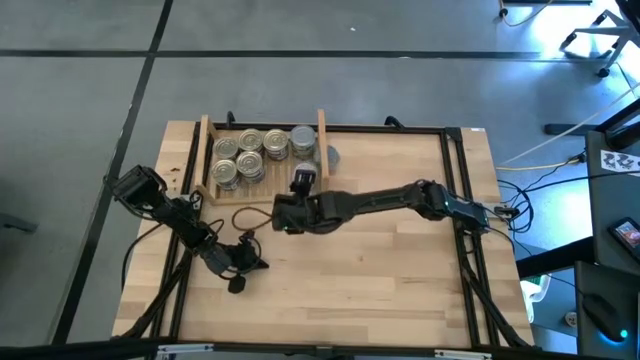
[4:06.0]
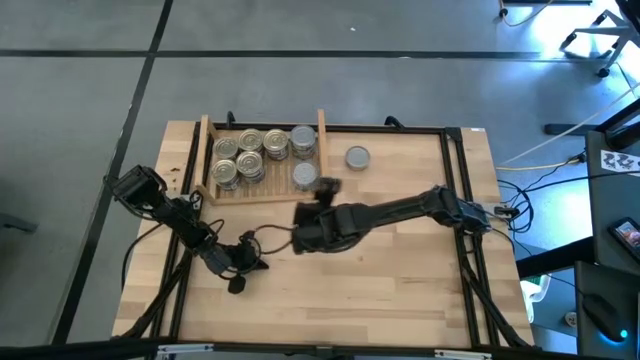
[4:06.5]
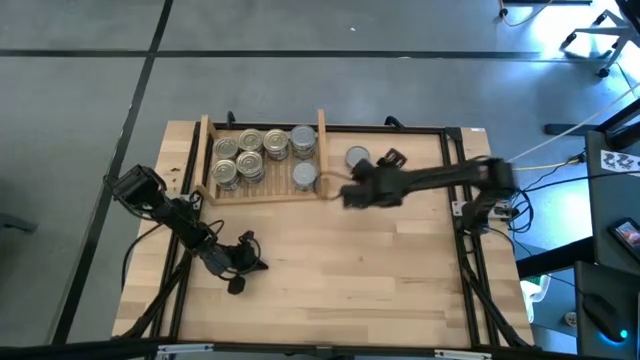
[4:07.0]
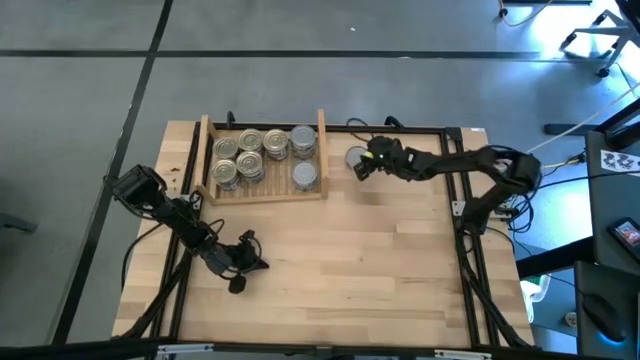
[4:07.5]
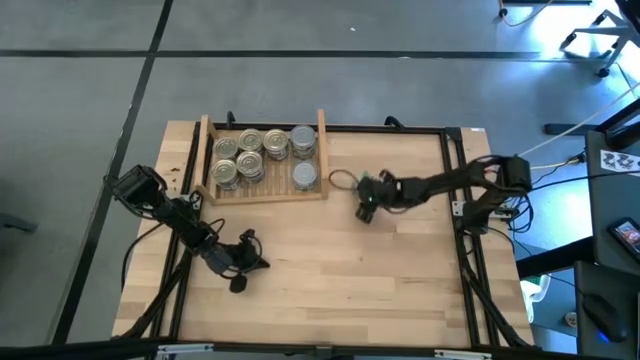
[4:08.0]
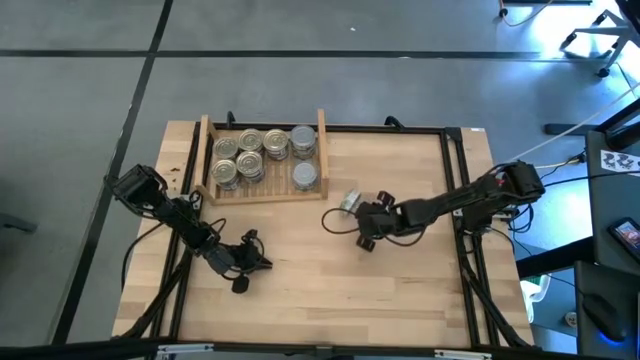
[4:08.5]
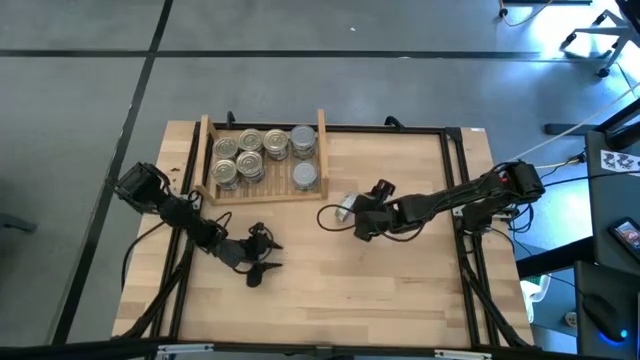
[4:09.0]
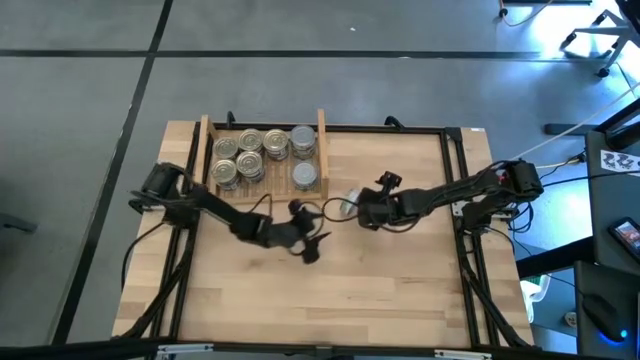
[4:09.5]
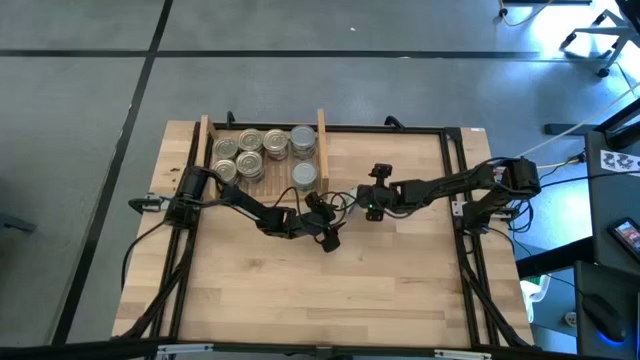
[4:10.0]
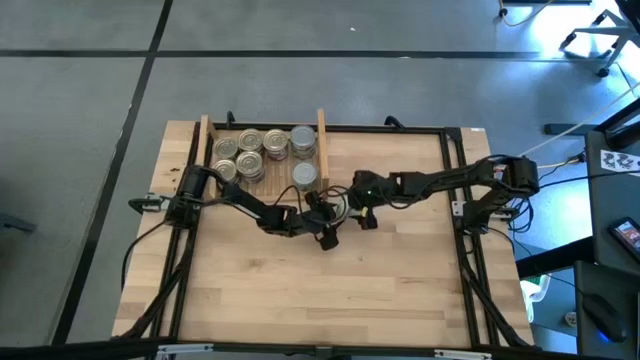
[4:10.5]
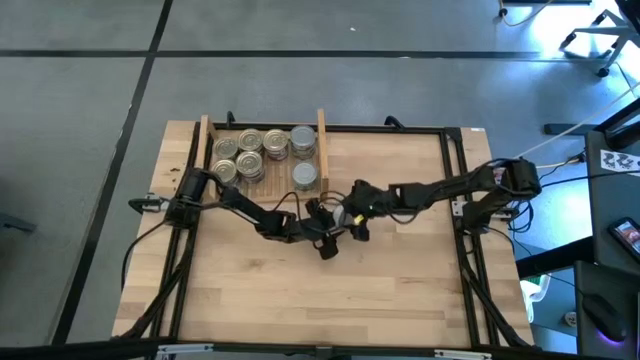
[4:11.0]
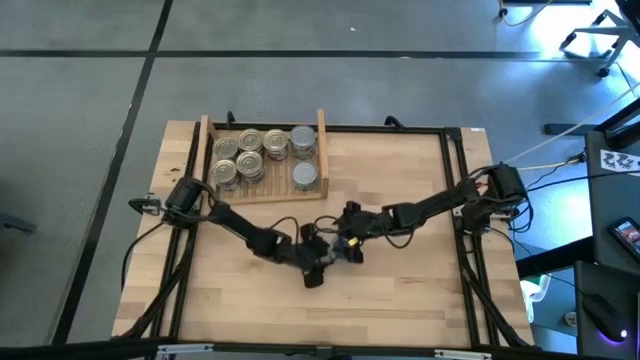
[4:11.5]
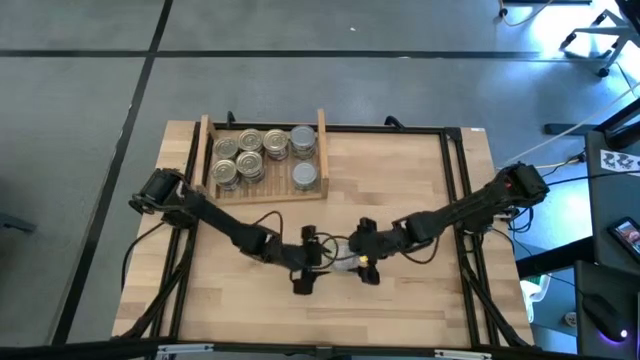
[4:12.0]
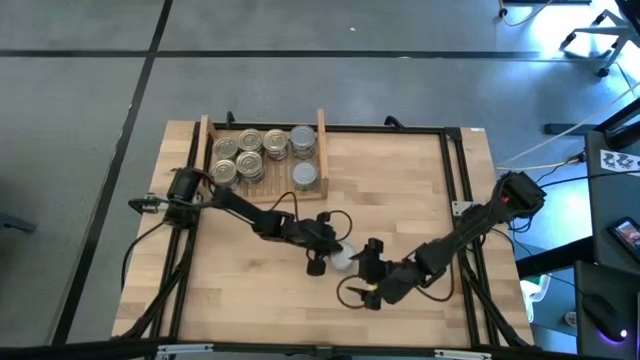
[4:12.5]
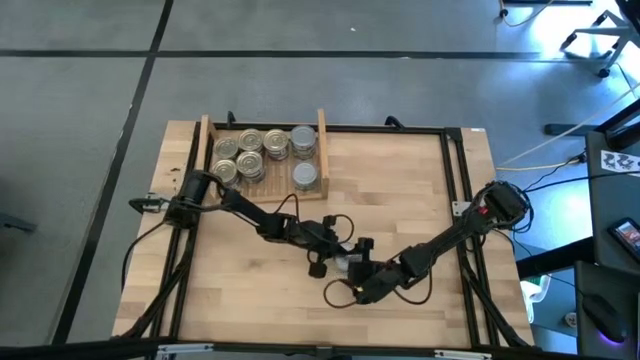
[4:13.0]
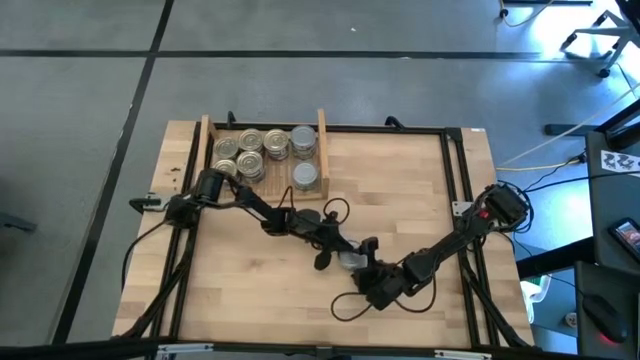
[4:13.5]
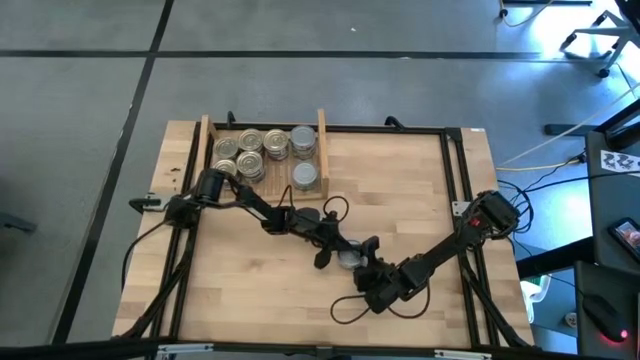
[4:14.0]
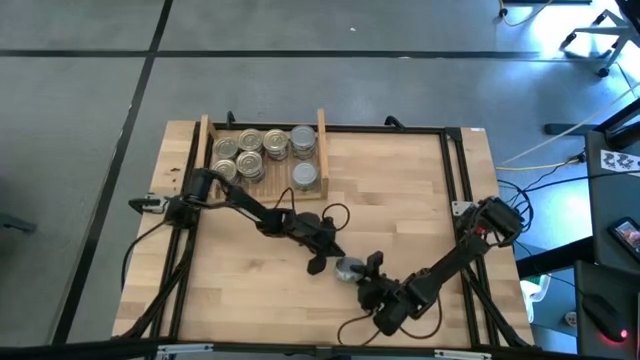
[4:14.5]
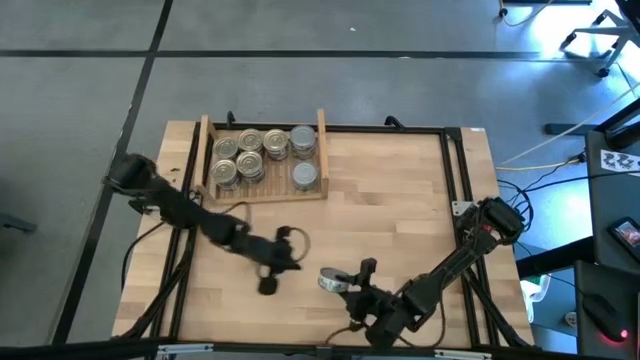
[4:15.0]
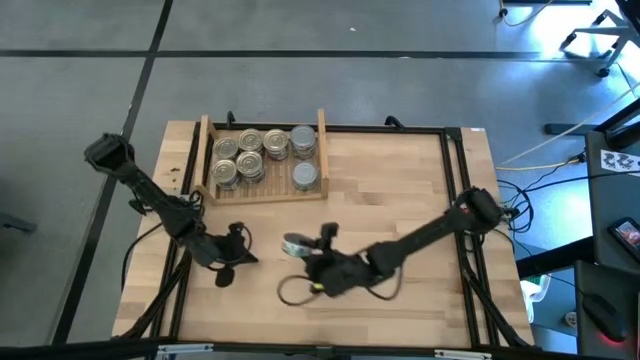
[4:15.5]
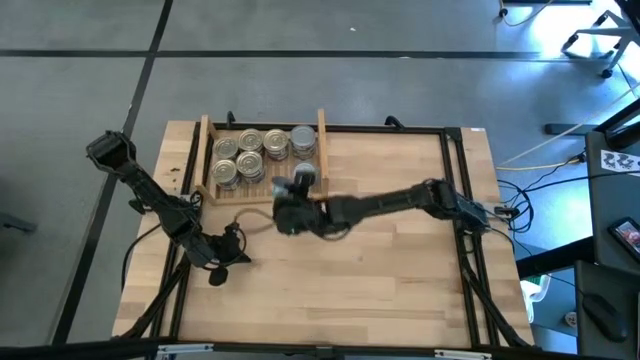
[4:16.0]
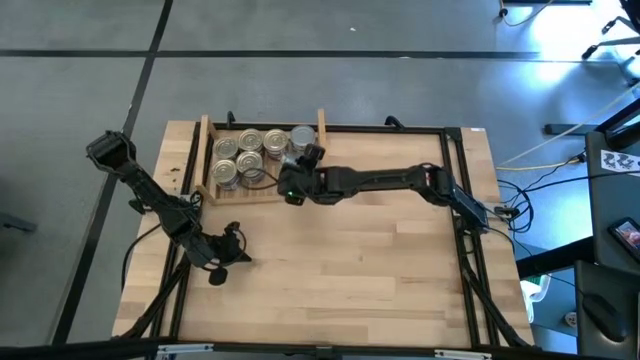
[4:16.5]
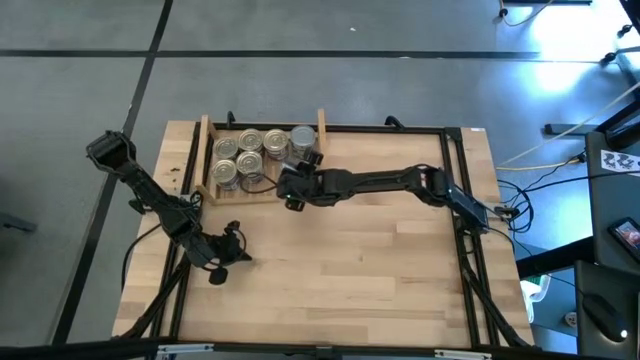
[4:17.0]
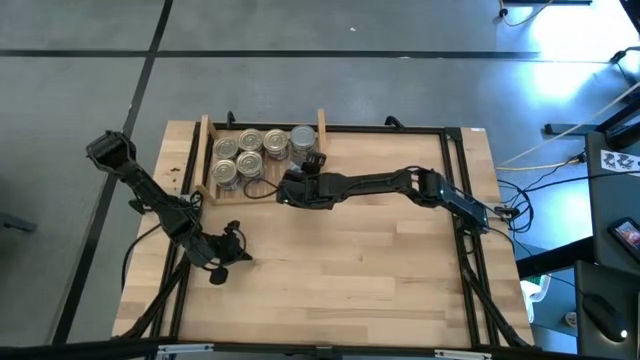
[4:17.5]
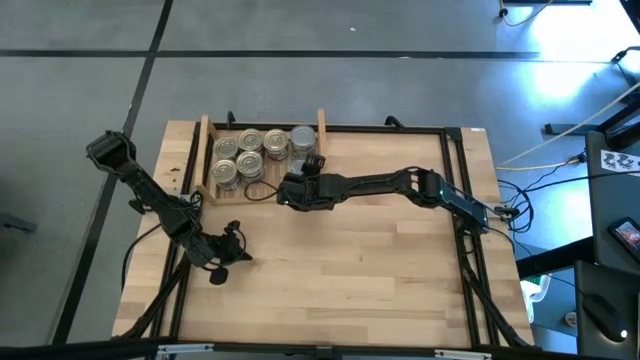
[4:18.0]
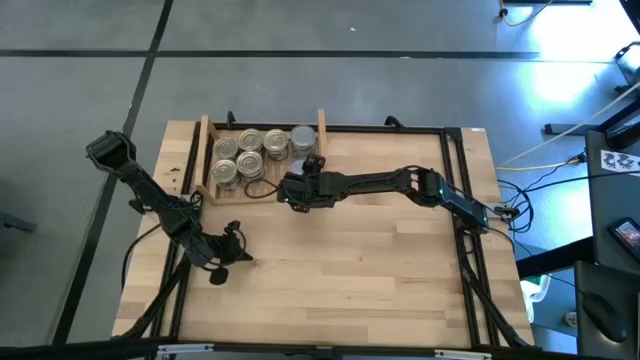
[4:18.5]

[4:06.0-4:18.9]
Task: Stack canned seafood by type on shelf
Stack the green tuna can on top of the other green tuna can

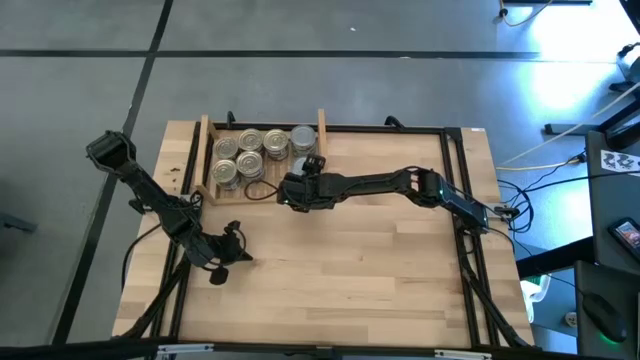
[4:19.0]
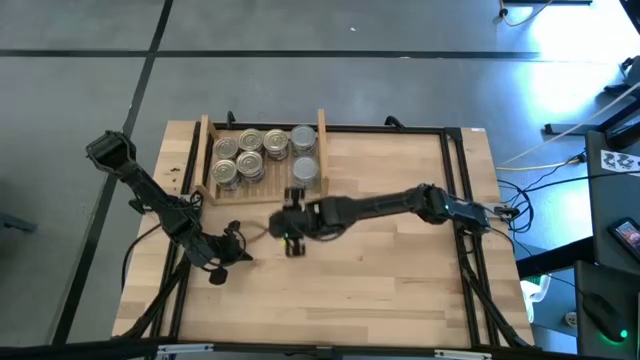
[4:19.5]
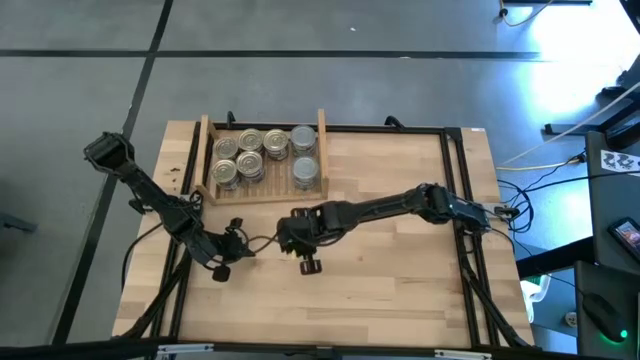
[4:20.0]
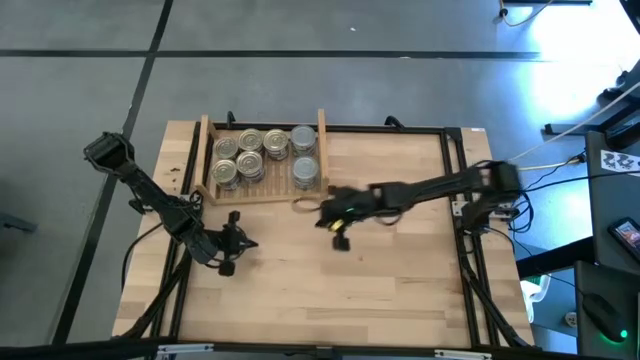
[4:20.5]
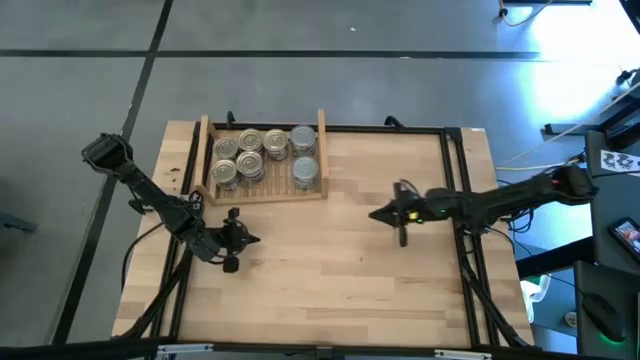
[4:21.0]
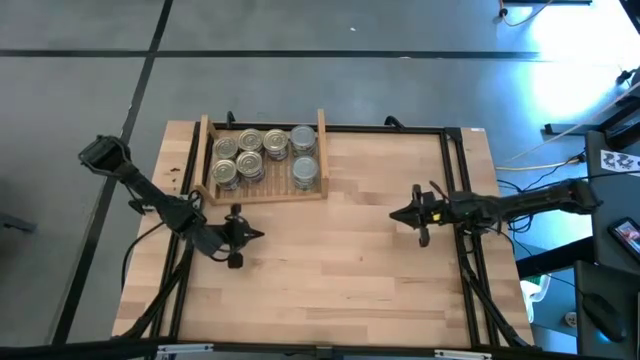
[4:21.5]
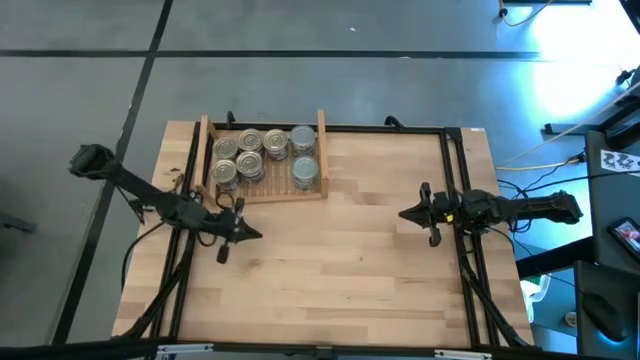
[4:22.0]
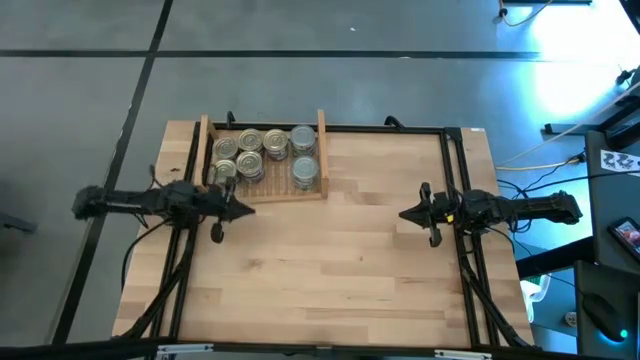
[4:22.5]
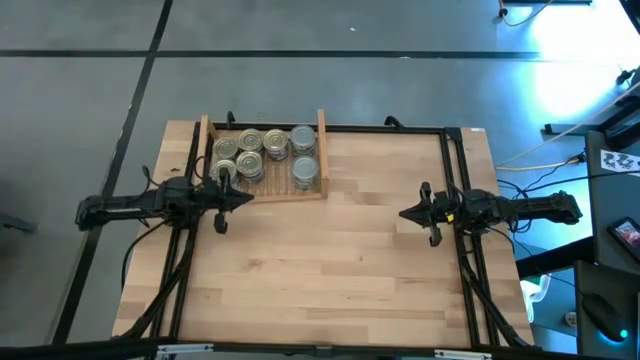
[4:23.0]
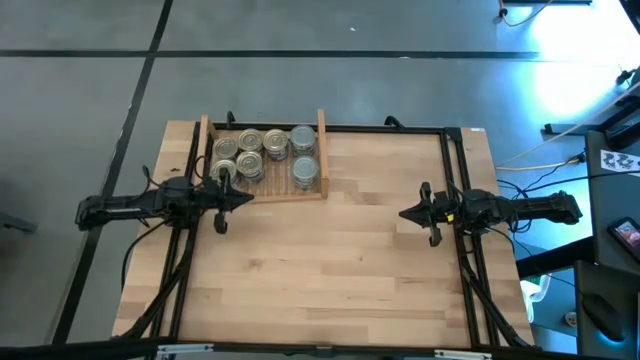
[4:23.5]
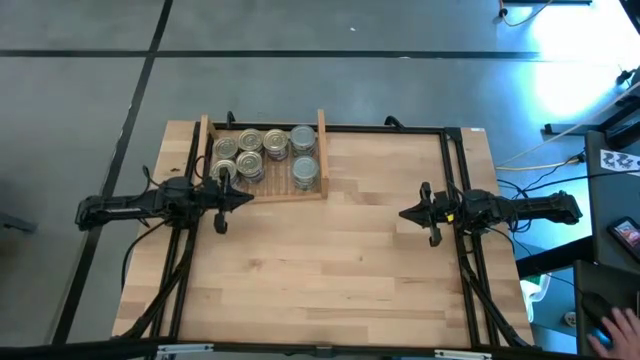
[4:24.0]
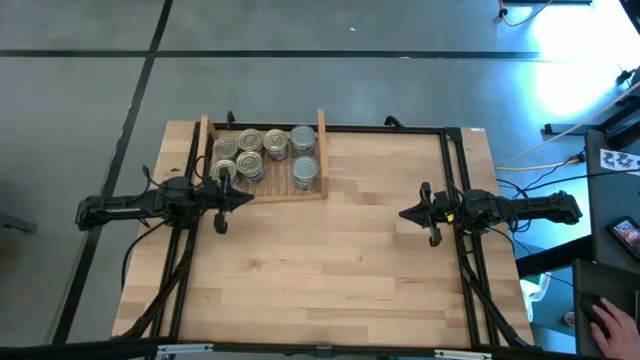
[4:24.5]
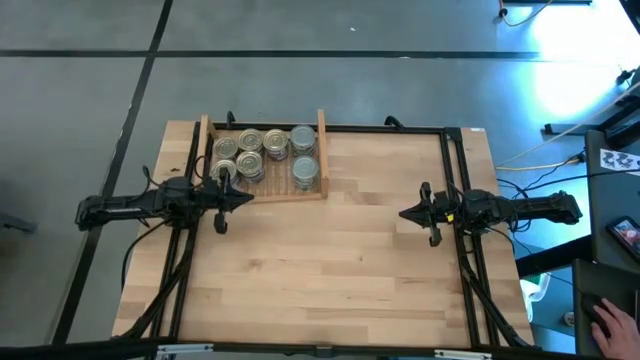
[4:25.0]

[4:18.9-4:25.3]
Return to Home Position

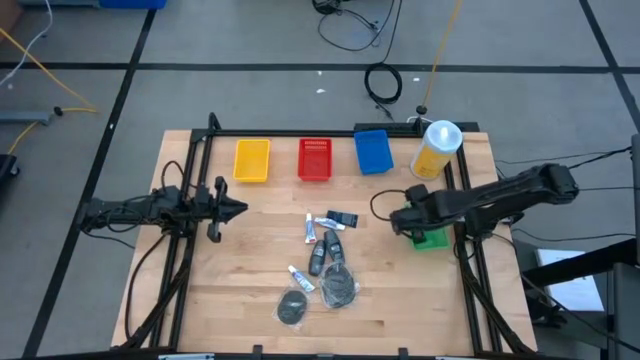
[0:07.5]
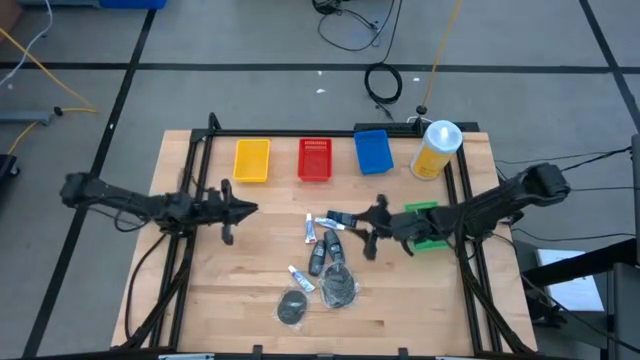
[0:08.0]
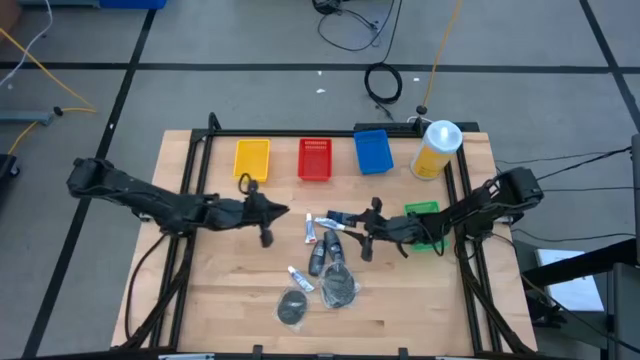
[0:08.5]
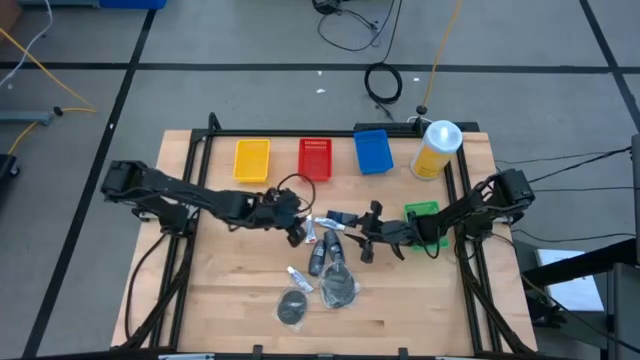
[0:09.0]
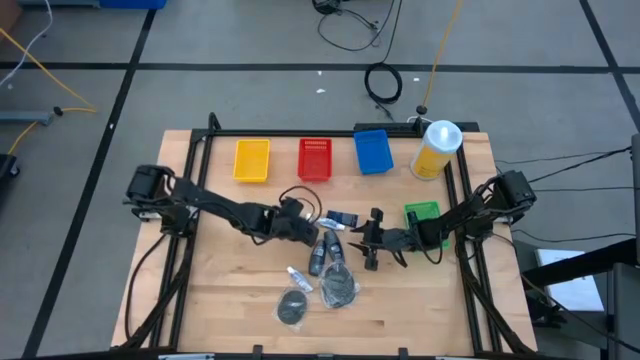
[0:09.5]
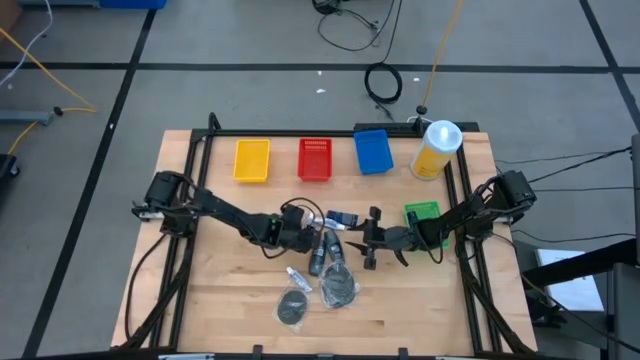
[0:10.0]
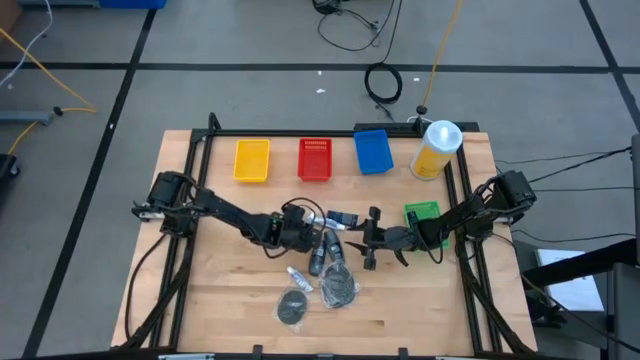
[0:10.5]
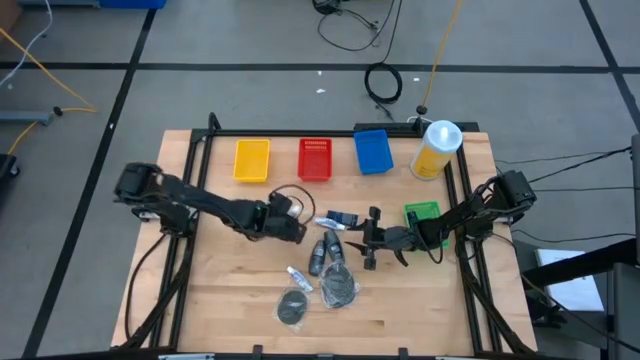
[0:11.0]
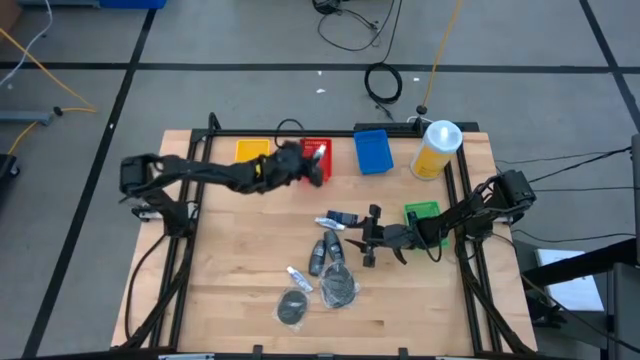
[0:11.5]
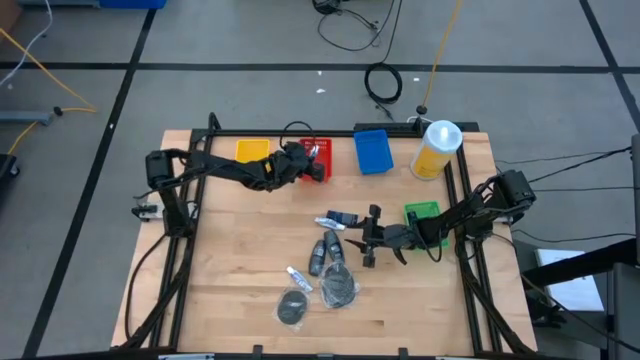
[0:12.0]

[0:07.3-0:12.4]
Task: Pick & Place Travel size toiletries
Put the white toothpaste into the red bin
